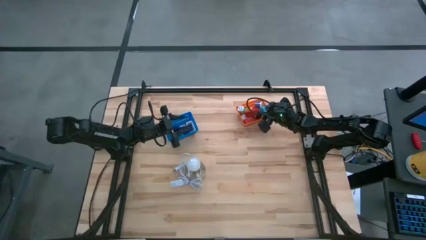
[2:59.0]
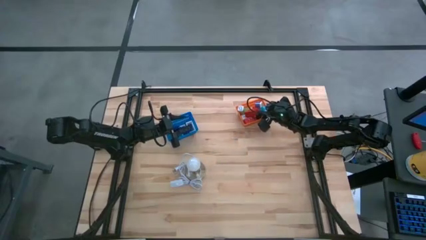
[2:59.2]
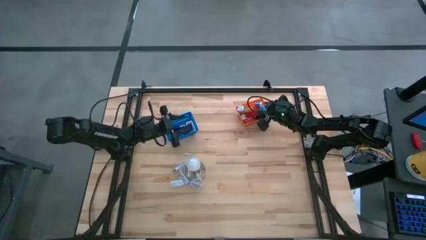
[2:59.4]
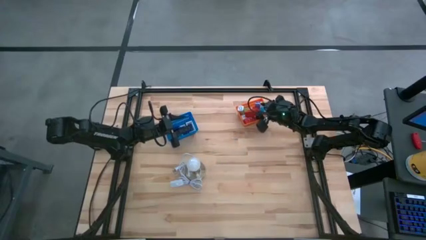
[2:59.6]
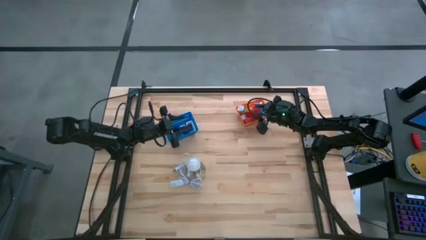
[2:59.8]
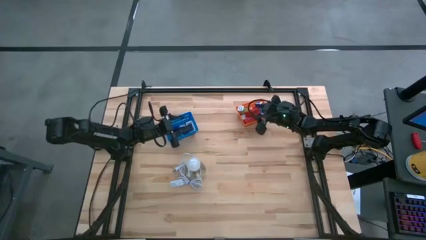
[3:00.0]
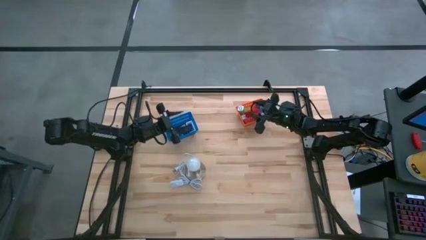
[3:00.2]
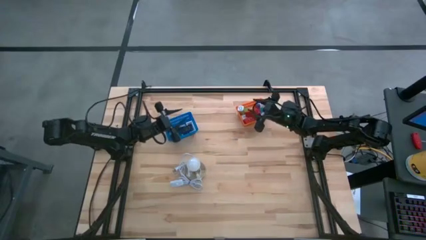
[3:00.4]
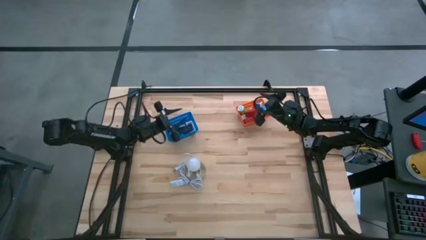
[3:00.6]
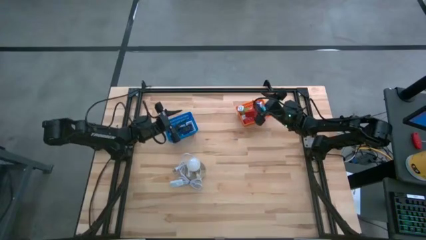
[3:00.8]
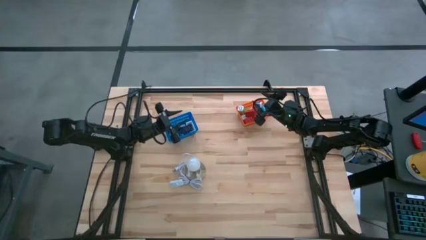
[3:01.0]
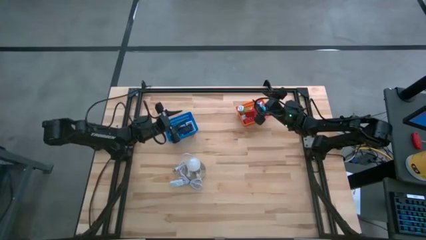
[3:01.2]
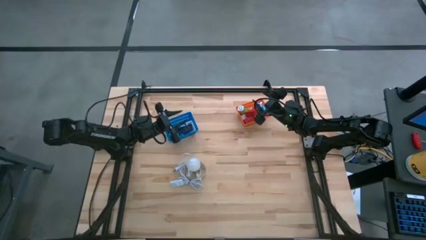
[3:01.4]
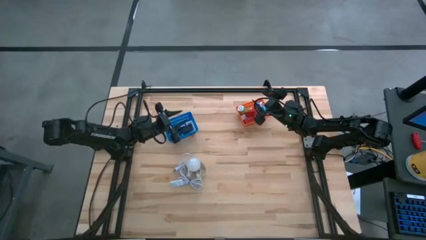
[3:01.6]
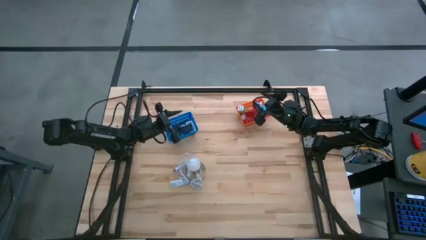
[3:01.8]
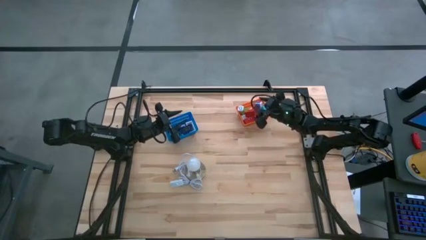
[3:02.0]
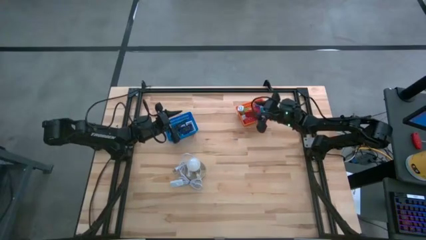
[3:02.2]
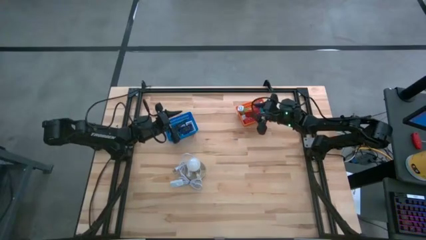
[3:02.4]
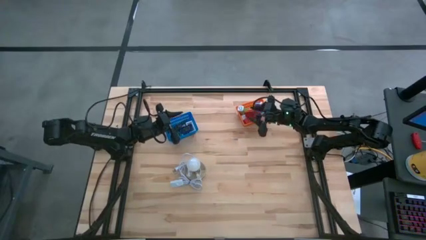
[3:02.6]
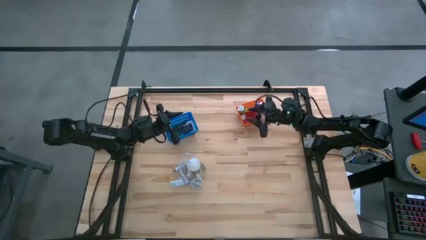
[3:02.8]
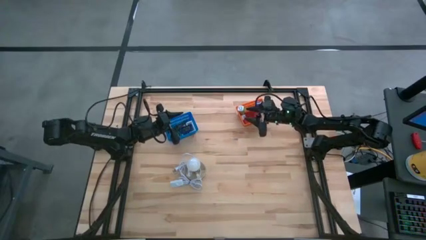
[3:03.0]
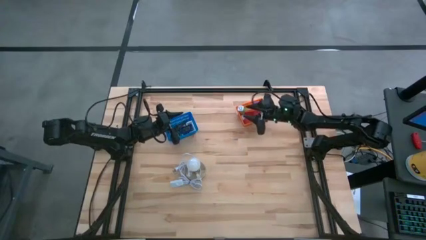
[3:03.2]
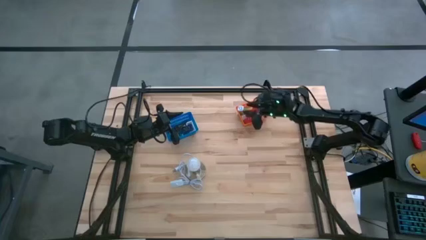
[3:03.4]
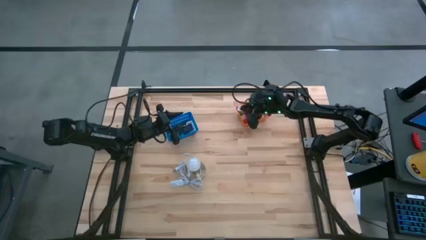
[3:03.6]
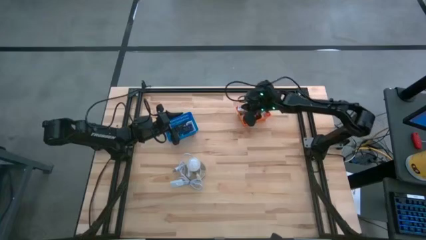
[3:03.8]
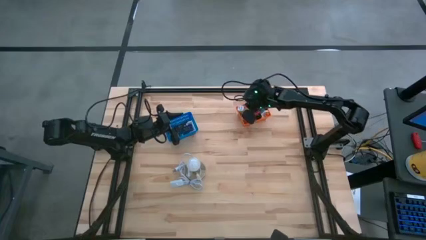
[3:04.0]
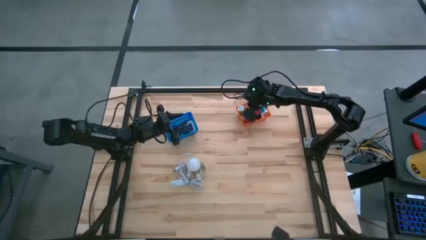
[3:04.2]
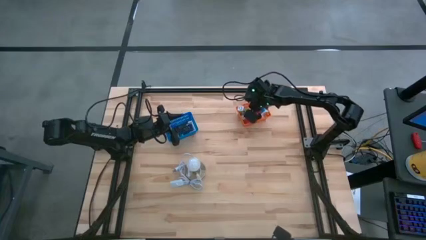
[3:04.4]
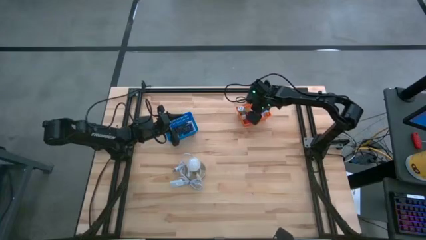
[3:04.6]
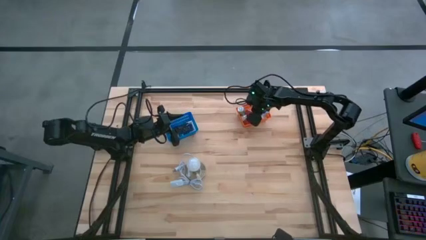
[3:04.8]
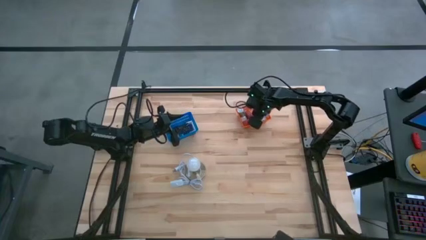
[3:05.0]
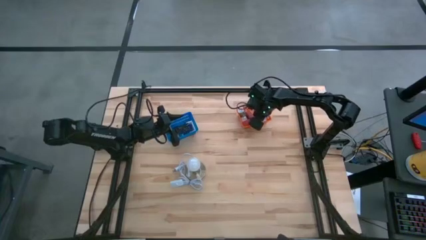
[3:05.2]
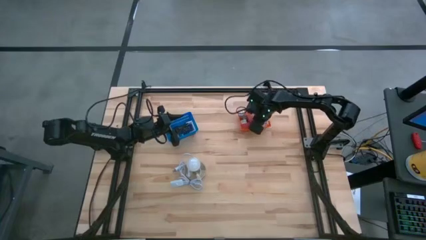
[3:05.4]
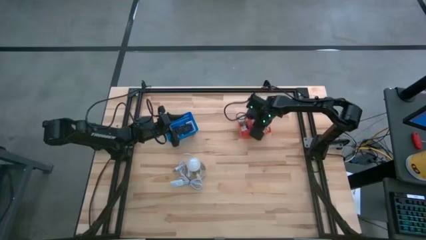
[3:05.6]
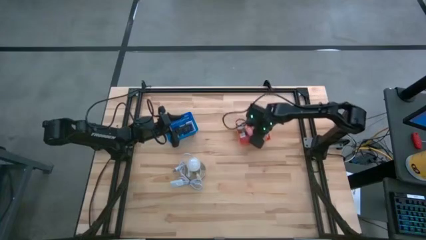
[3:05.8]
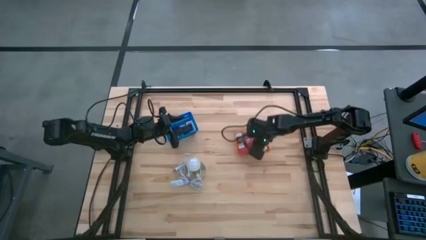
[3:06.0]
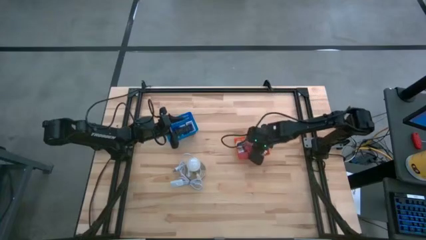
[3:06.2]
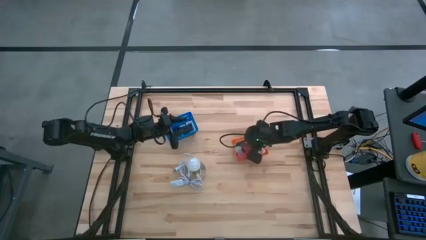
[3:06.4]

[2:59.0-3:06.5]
Task: Pick & Place Office items
Move the orange bin to the center of the table

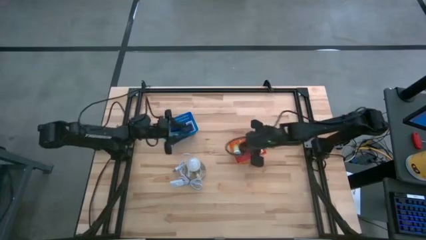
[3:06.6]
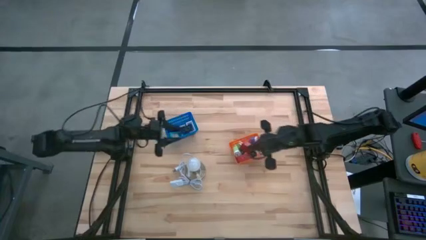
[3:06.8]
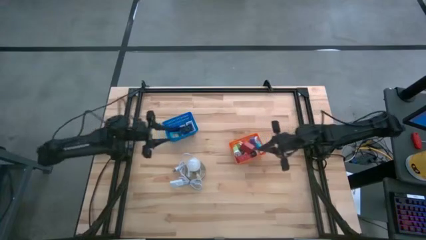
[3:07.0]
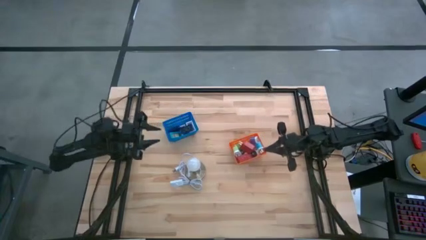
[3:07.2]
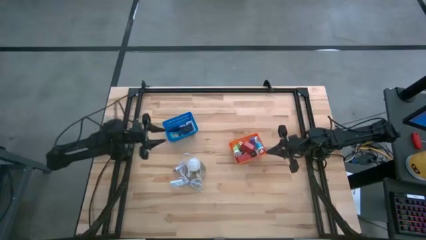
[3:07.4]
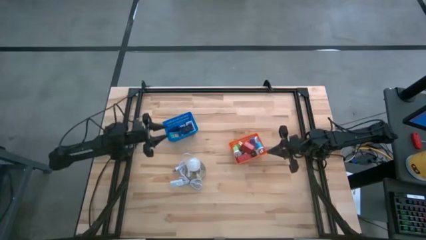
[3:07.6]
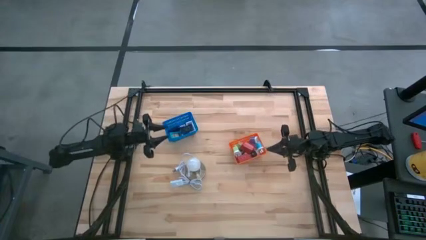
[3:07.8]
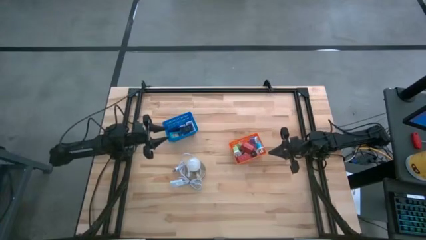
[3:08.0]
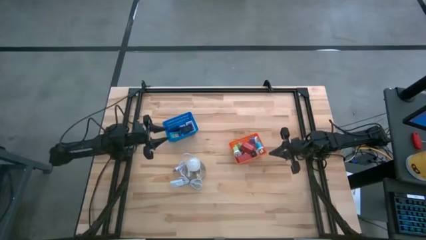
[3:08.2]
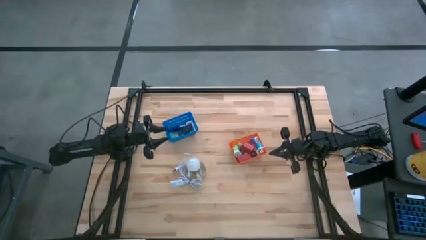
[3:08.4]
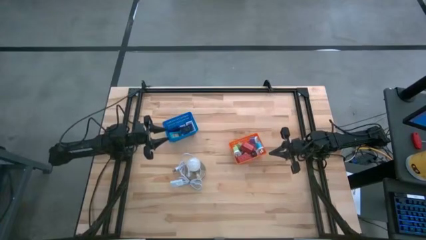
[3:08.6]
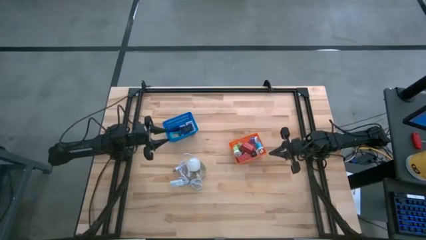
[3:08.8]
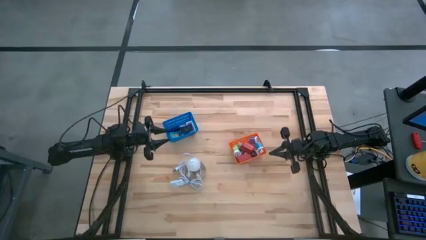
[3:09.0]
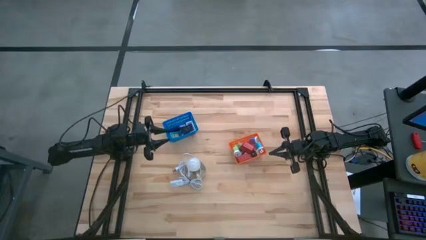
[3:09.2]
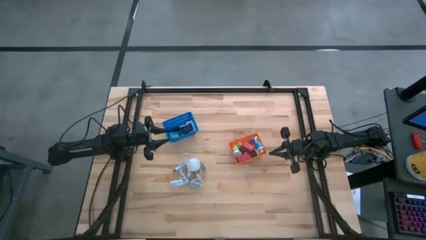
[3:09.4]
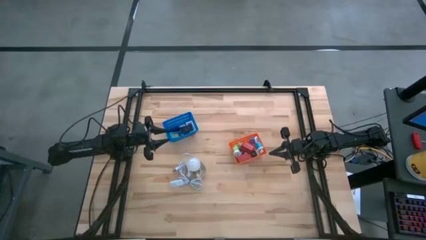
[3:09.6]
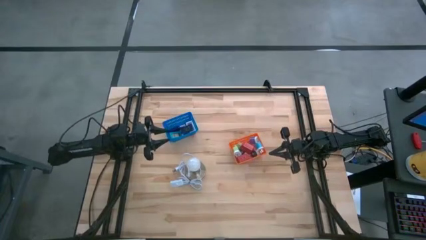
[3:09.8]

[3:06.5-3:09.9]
Return to Home Position

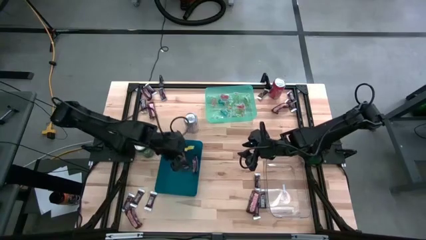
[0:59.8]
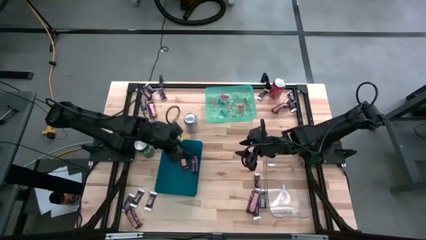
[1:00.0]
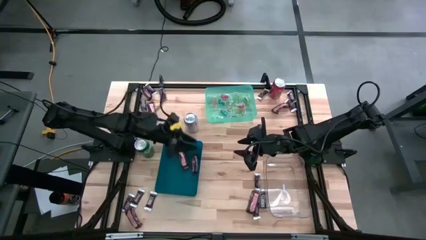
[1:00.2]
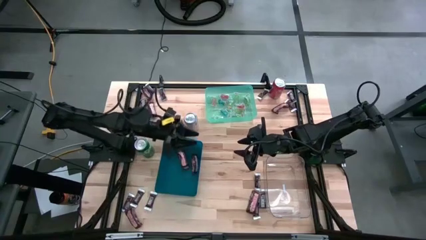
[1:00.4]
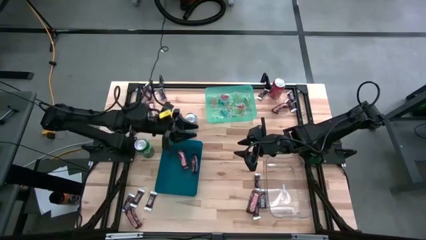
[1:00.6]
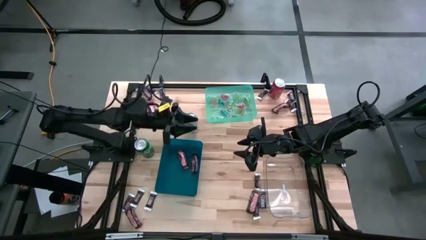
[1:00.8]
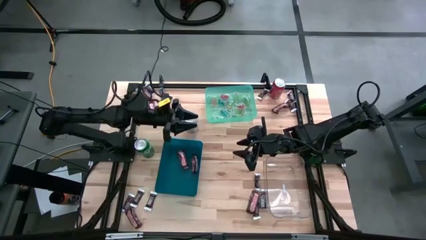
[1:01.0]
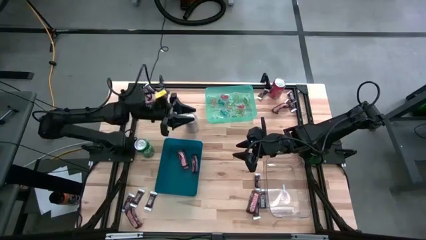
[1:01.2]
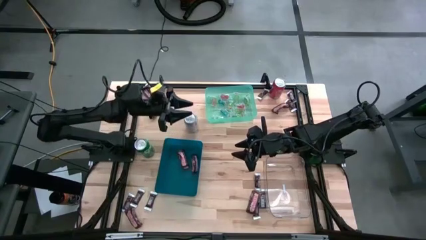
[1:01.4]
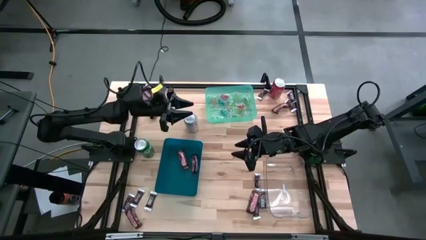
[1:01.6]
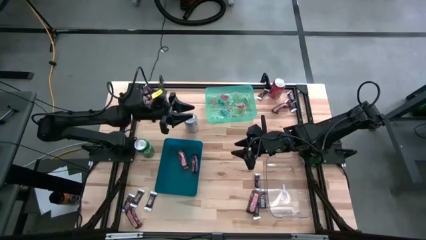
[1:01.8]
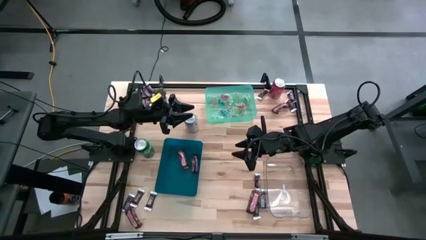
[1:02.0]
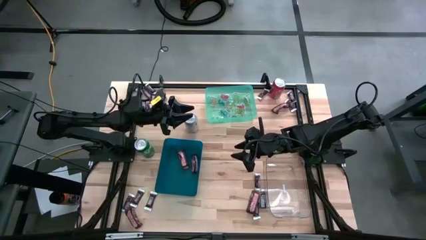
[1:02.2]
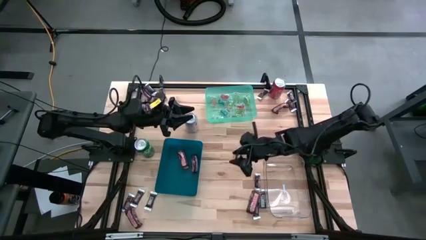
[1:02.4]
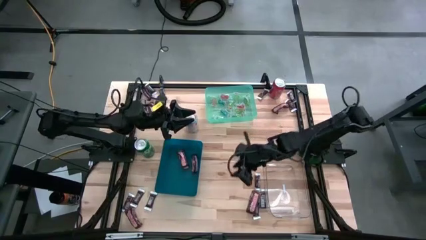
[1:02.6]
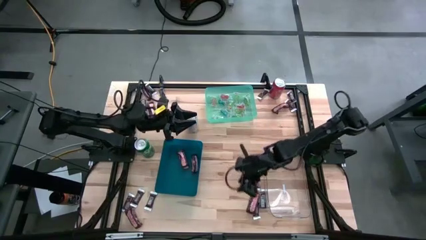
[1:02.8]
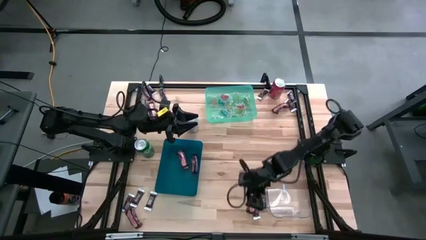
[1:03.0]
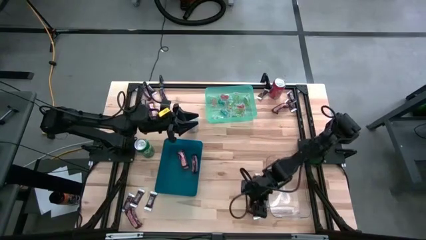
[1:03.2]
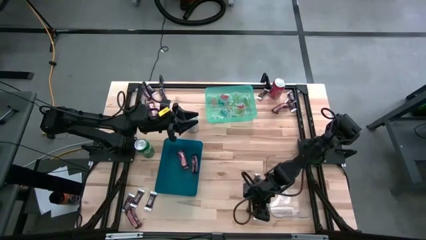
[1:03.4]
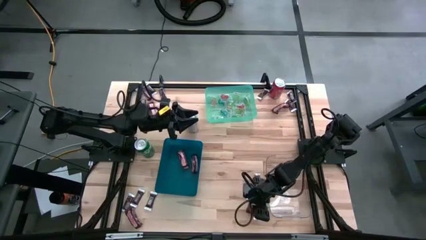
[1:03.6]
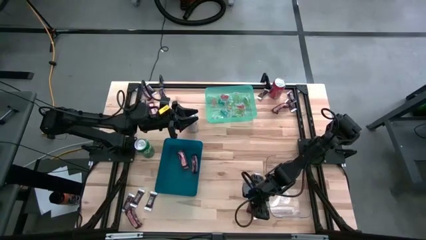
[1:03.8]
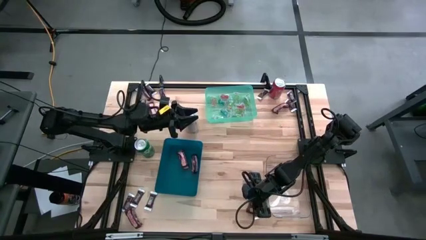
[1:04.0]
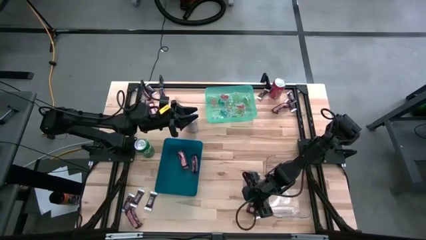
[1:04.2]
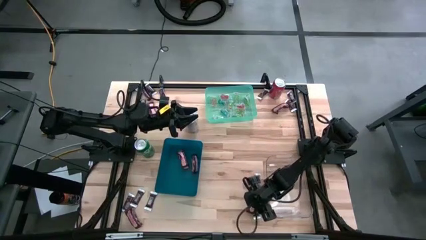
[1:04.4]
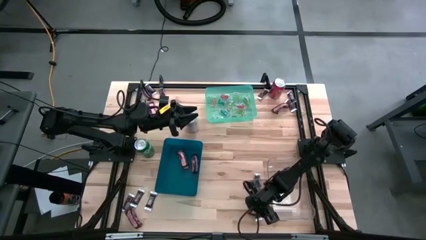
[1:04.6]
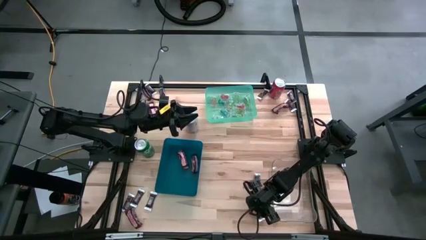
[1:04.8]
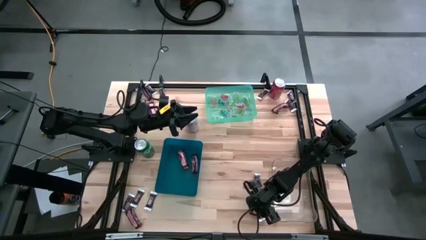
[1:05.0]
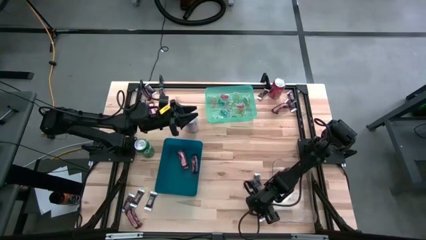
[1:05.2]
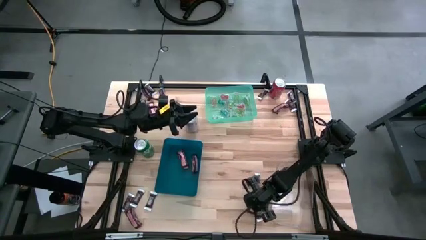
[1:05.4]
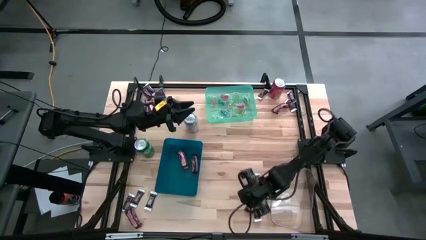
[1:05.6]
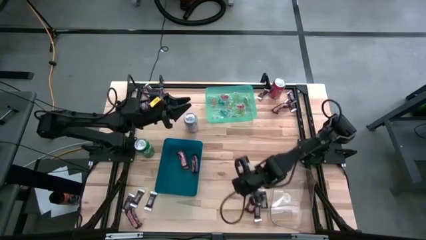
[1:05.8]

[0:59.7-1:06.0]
Task: Organize candy in baskets
Put the brown chocolate into the blue bin
